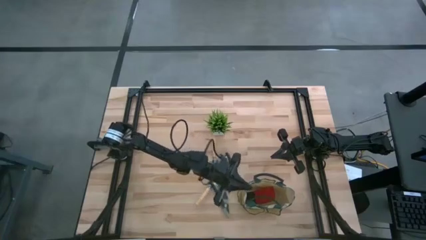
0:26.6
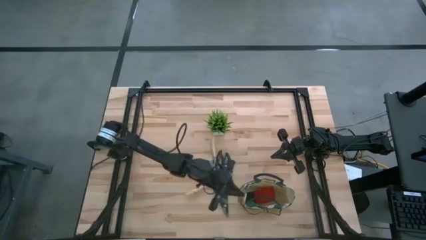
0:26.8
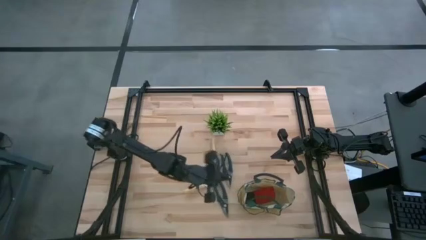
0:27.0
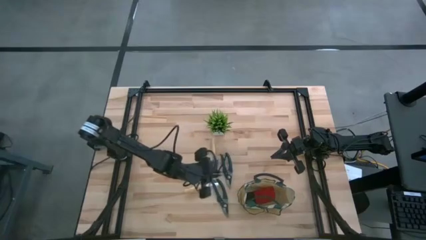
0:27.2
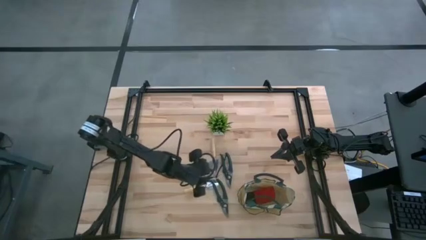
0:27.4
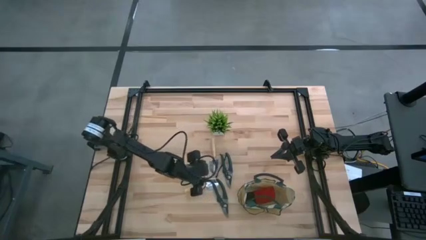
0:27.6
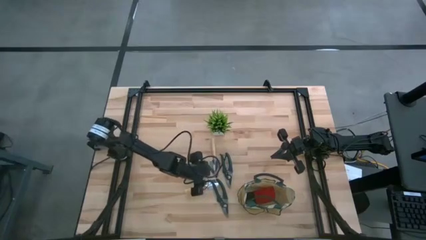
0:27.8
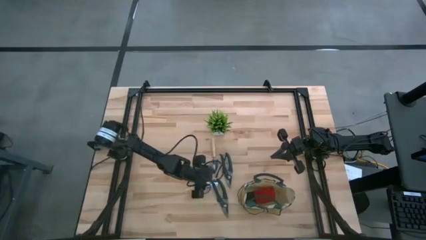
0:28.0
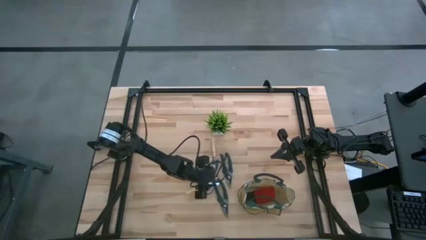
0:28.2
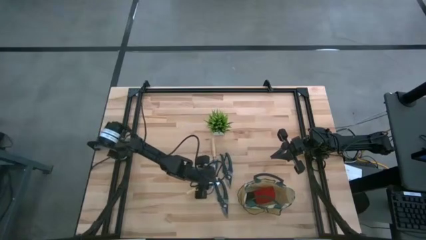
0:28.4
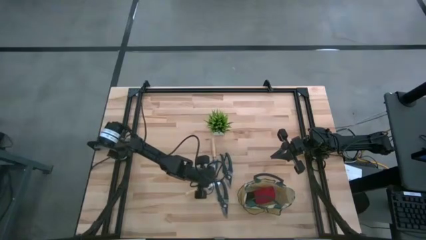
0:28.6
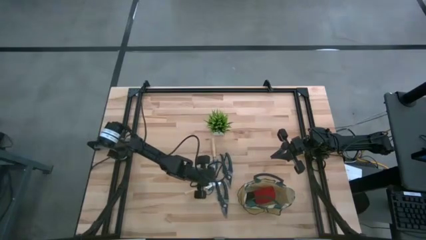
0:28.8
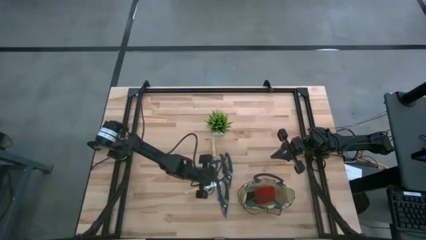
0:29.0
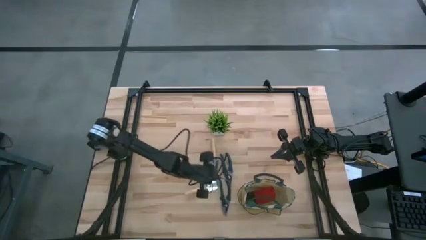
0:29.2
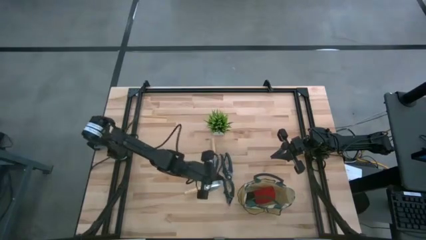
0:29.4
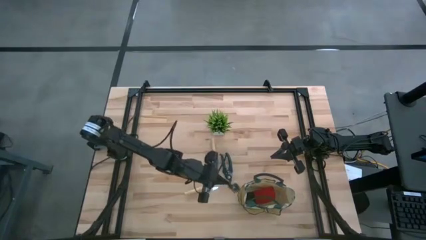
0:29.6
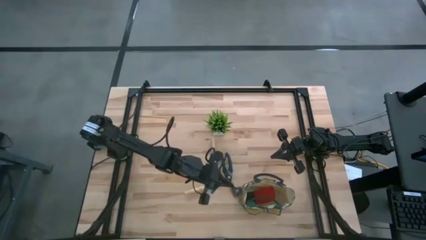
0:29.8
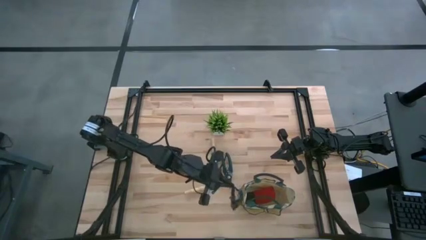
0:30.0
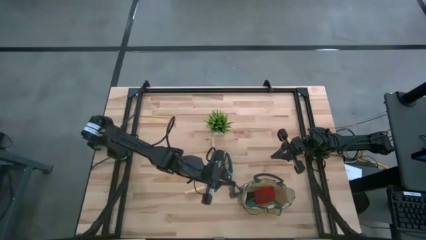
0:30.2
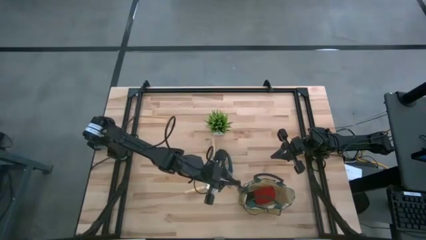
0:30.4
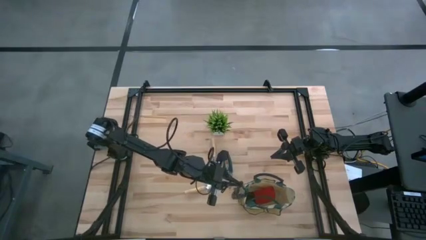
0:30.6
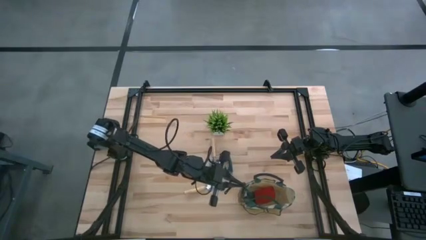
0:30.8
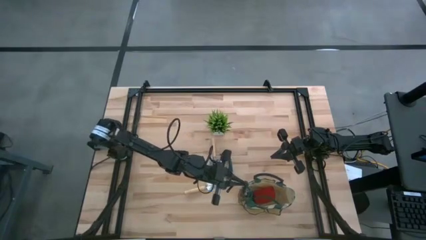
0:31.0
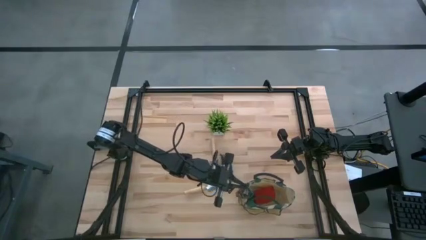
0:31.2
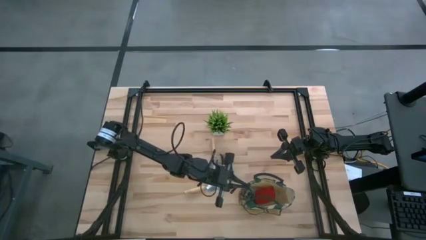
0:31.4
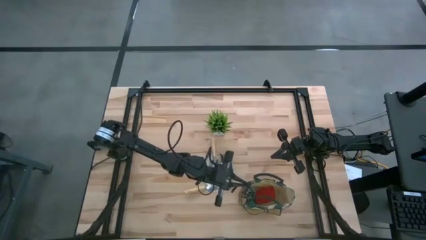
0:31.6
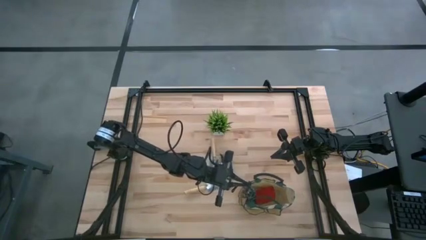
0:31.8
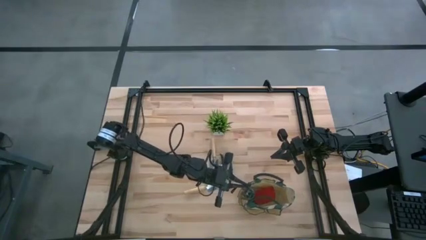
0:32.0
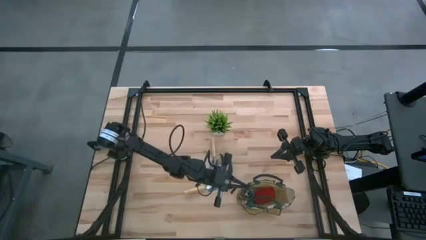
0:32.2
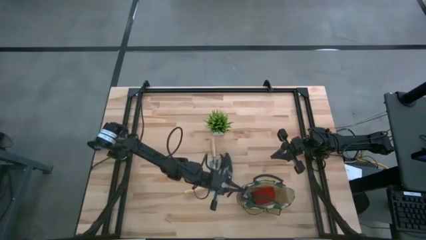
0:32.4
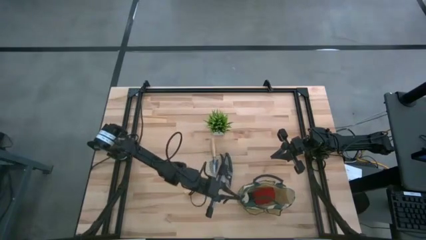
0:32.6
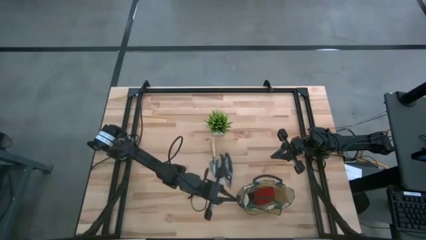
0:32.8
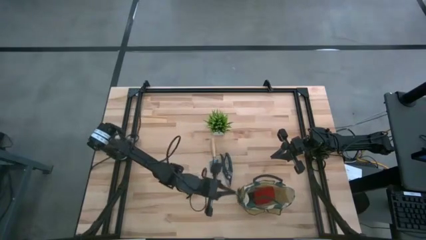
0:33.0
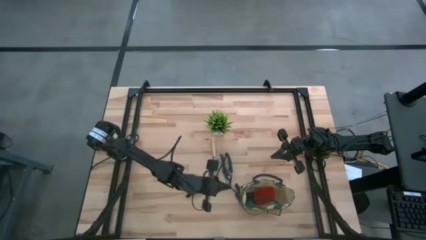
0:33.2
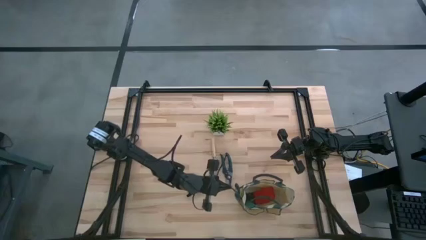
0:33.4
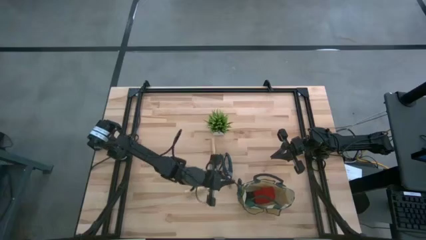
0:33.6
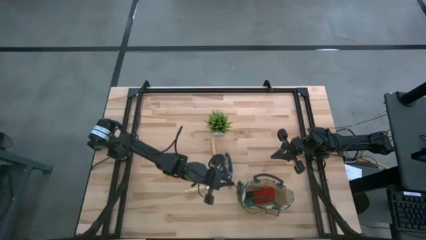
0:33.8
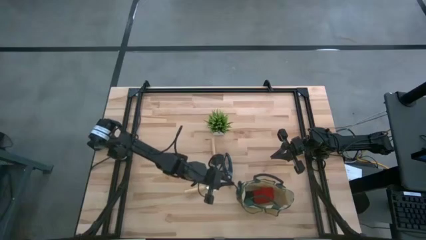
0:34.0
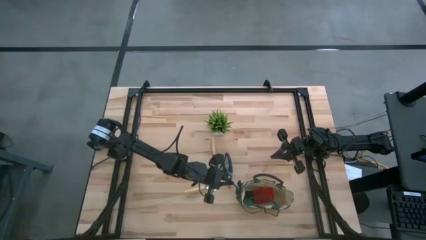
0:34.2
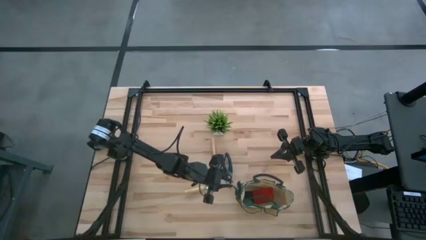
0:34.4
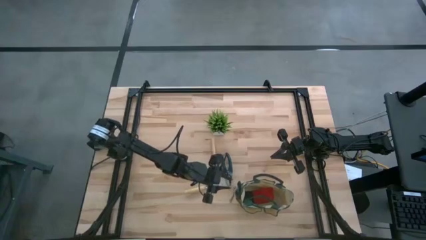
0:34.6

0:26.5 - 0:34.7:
Task: Pick & Place Garden tools in Gardening bag
Put the green shear scissors into the green gardening bag

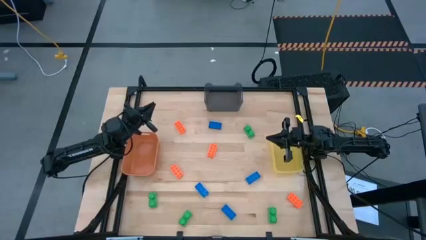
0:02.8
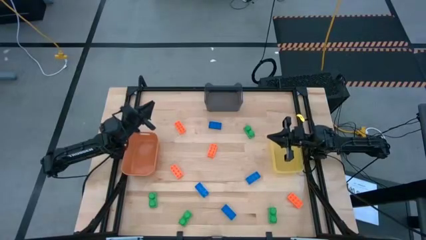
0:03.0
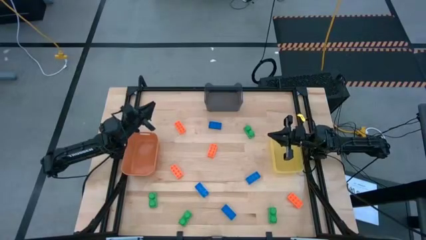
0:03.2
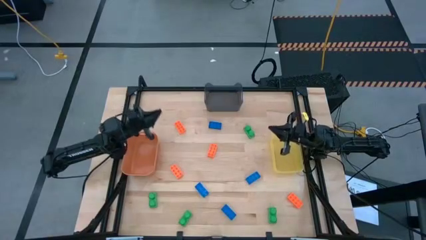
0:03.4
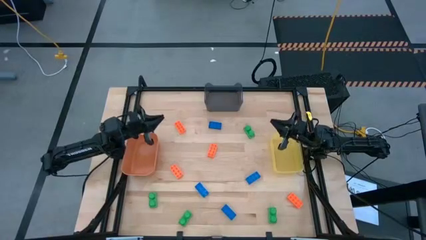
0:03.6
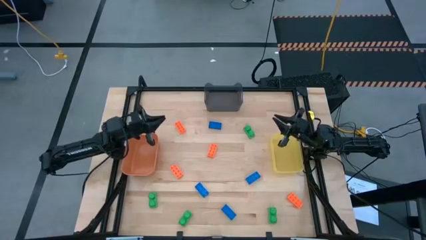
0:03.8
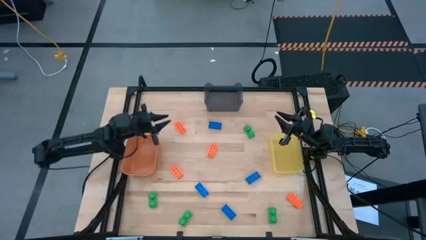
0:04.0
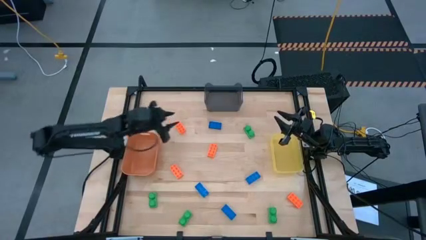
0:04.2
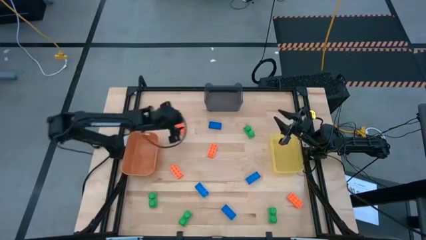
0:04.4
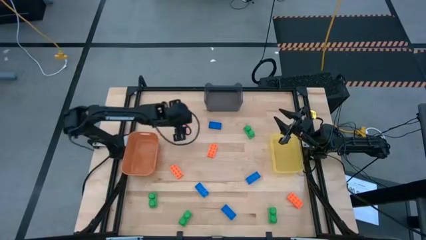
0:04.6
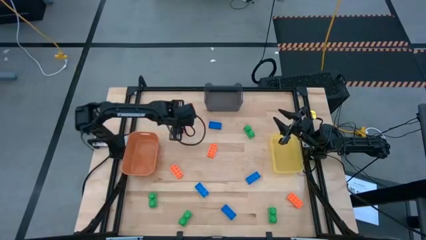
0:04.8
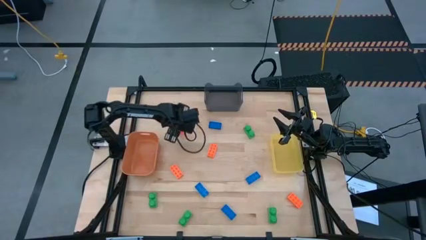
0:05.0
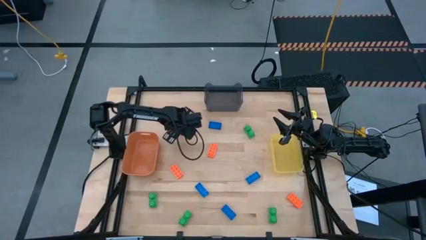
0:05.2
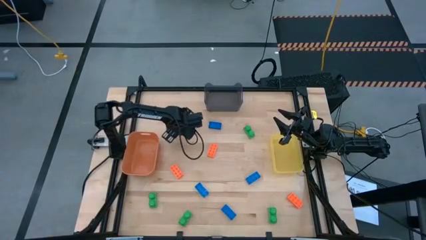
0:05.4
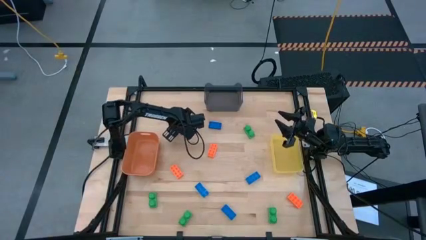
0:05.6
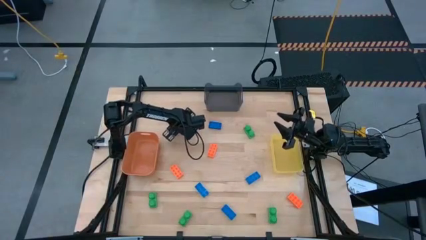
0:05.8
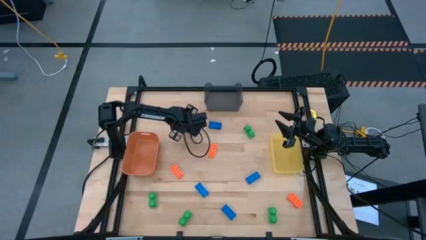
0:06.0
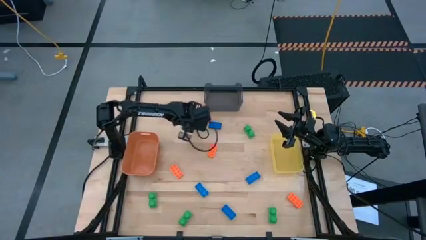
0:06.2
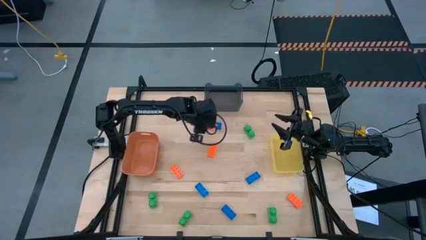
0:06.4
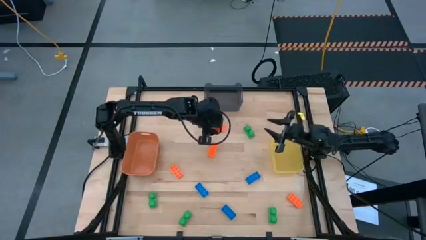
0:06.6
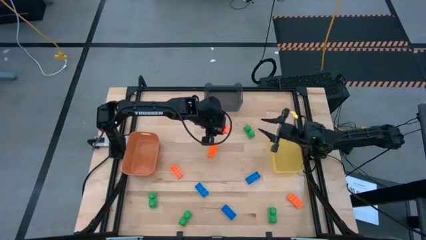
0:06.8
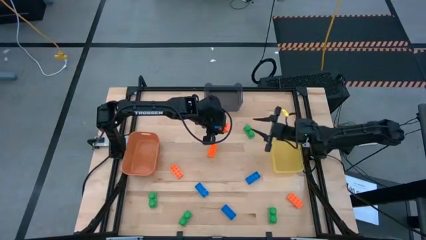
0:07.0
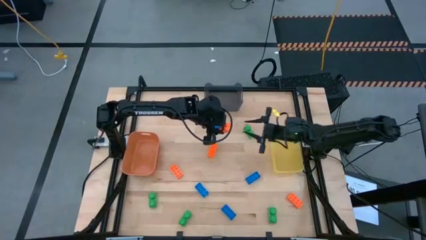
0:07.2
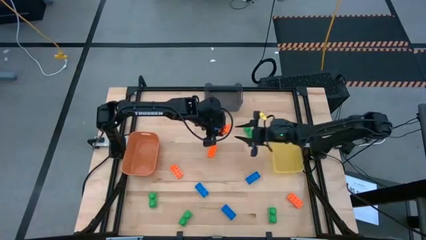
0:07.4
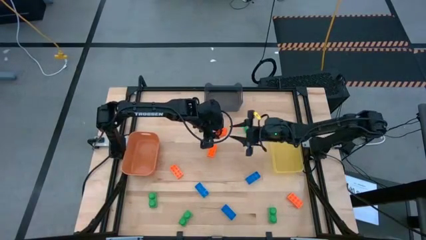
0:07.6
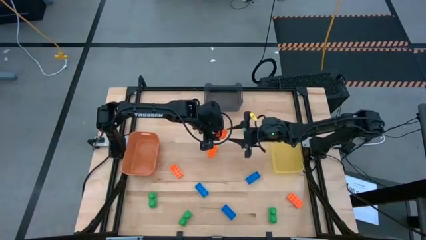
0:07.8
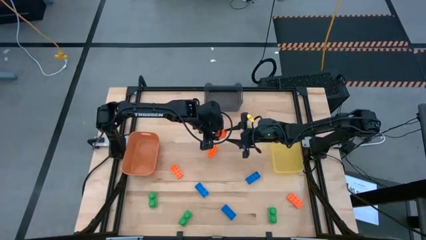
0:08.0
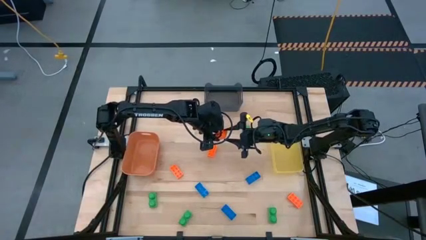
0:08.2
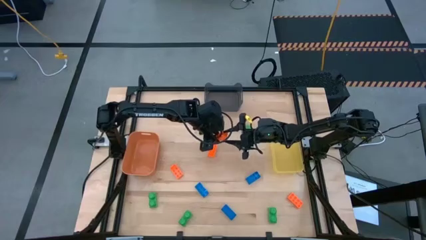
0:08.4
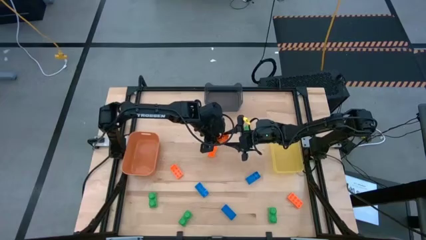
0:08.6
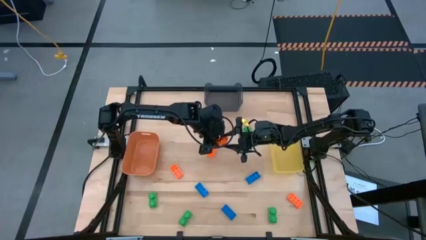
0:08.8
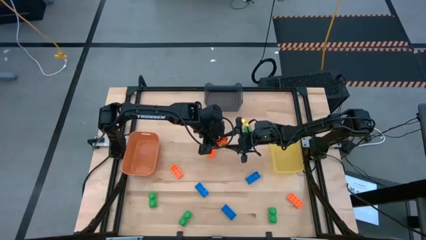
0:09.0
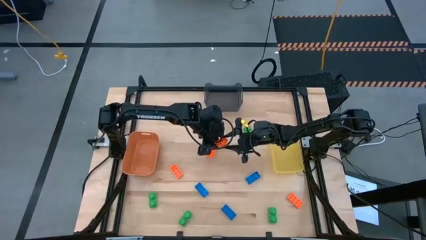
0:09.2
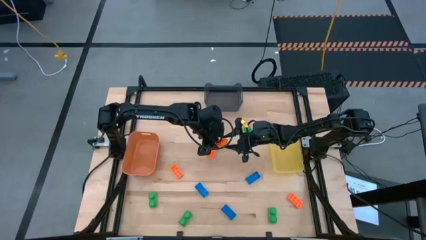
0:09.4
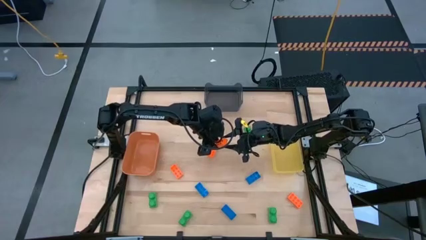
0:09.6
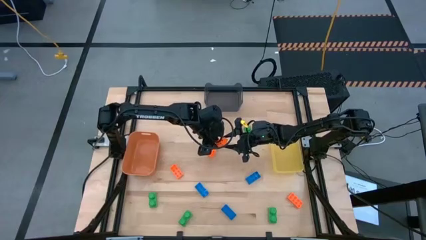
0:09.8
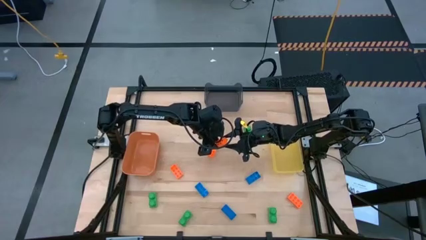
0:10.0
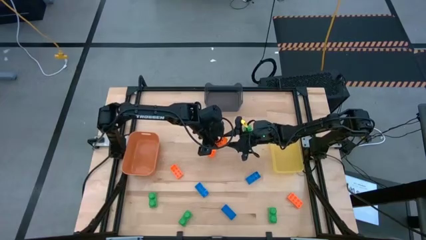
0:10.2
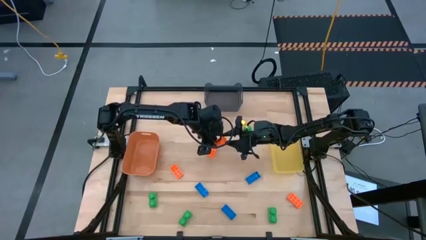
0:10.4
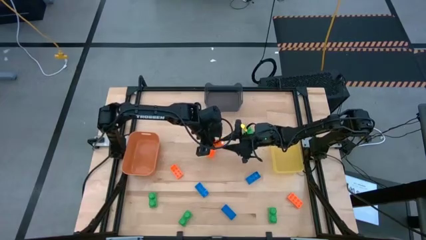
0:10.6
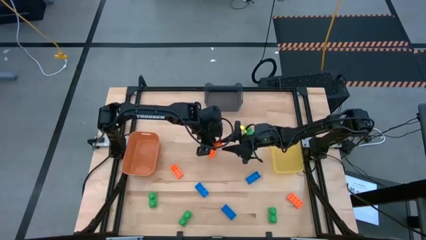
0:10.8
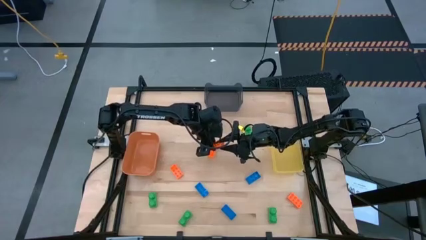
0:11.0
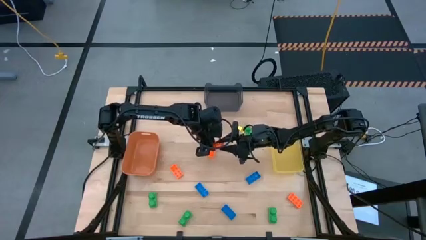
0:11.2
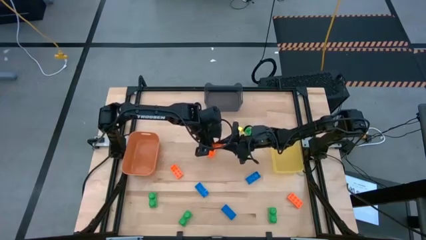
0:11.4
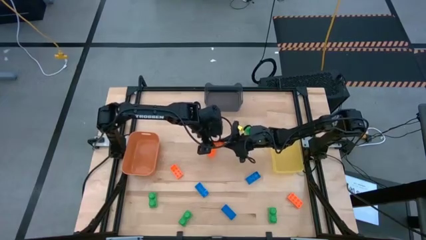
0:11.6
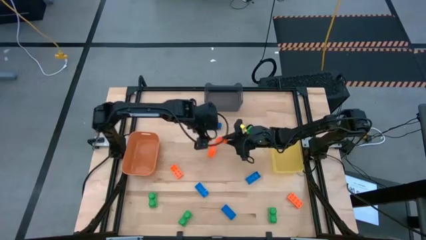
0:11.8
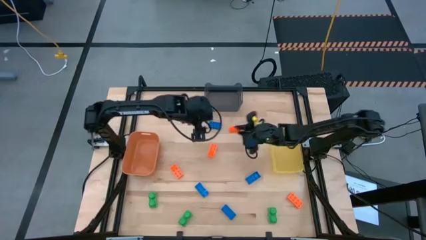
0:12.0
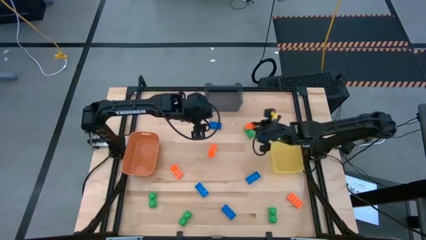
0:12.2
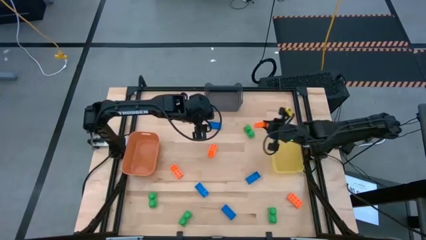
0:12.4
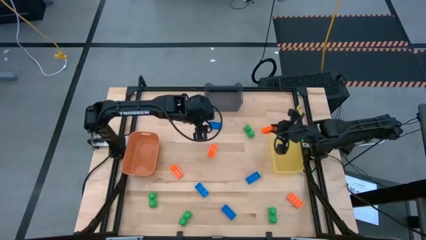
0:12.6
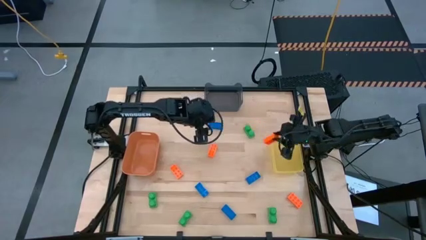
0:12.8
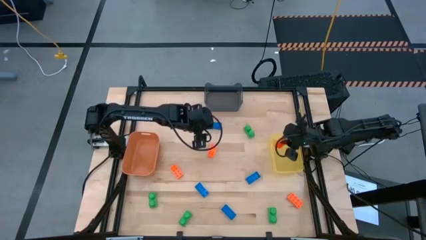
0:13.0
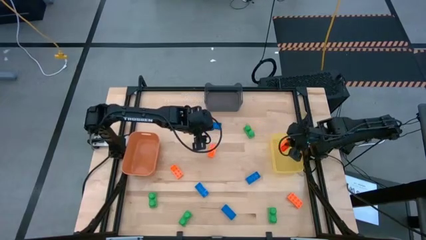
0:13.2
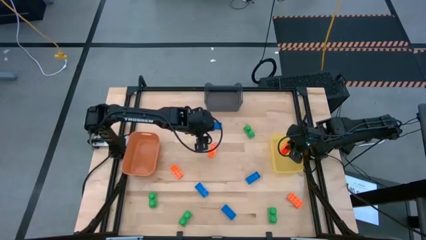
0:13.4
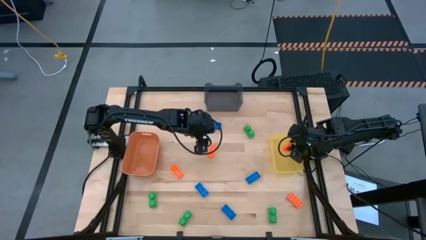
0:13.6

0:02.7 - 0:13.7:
Task: Sort & place blocks by color
Put the orange game piece into the yellow bin
